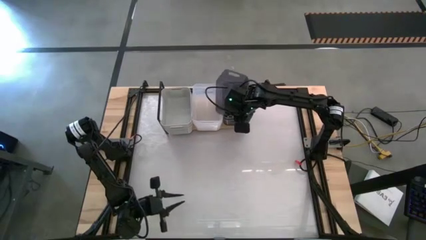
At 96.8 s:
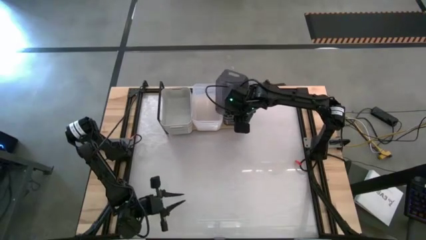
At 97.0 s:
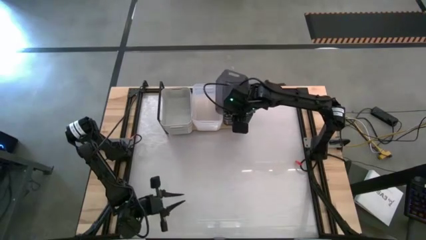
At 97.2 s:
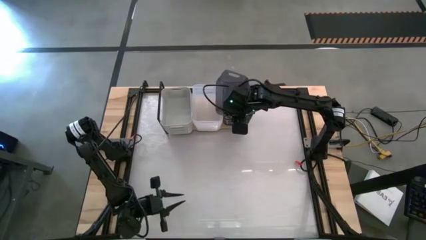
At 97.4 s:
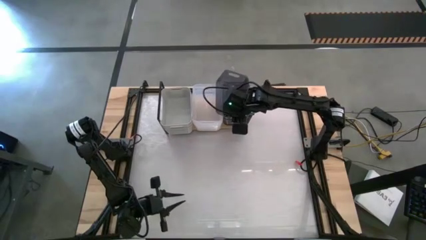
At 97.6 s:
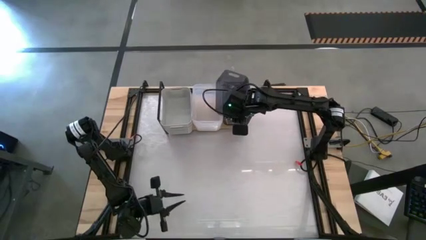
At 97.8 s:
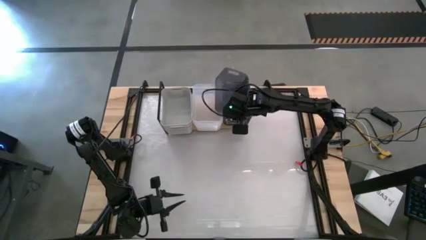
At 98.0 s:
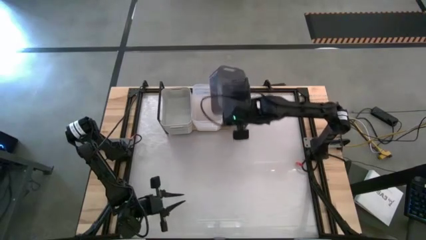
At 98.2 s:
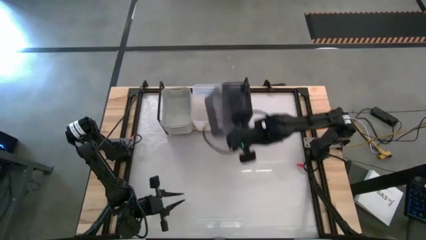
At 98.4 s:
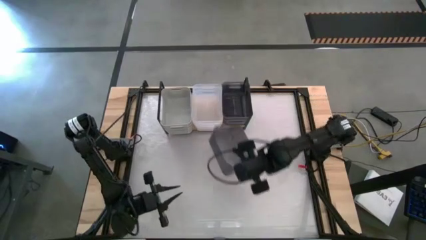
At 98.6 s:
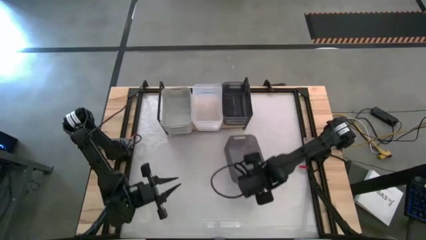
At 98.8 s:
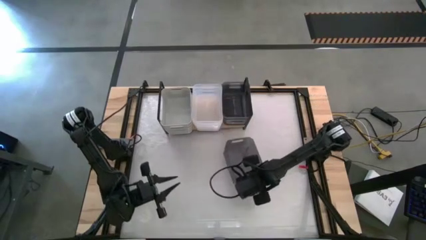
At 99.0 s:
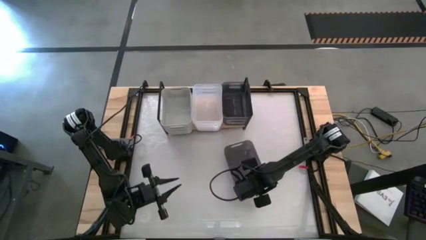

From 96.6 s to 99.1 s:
Task: Stack baskets on shelf by color
Remove the black bin from the shelf

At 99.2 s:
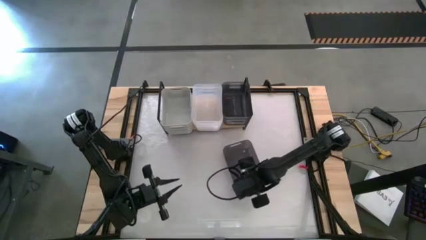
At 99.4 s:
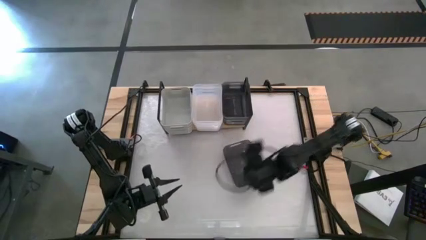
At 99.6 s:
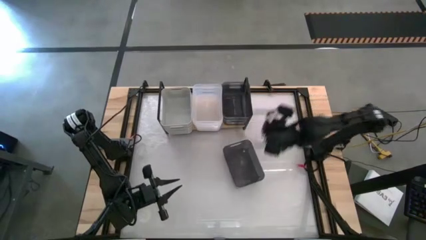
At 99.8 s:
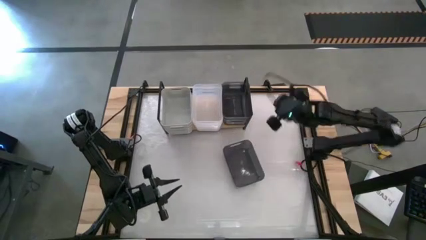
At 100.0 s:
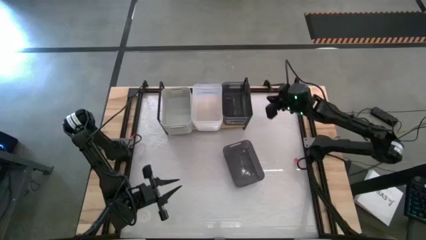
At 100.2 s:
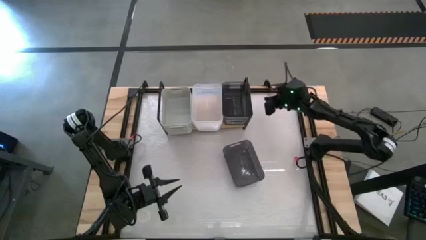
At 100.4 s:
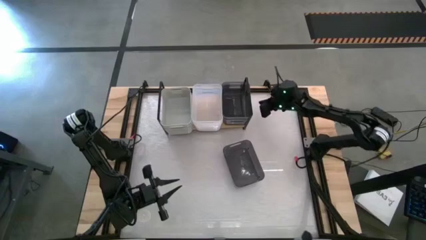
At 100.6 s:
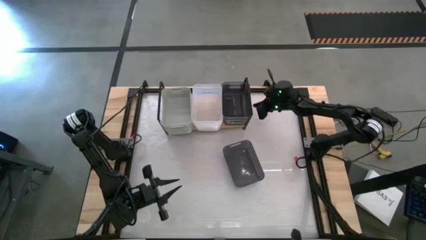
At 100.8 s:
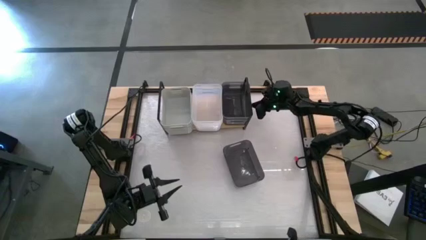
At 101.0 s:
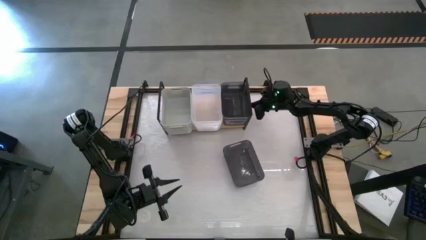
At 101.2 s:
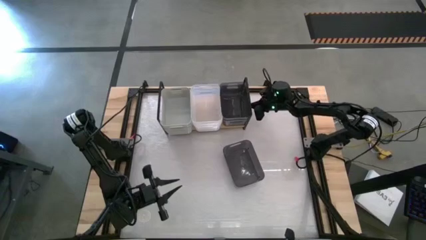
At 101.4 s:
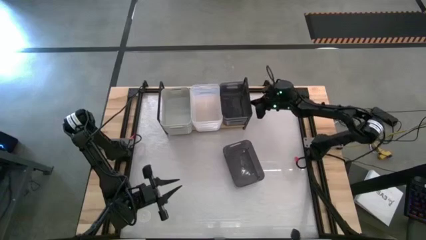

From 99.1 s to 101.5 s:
Adjust the black bins on the shelf

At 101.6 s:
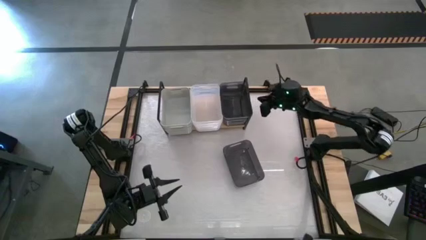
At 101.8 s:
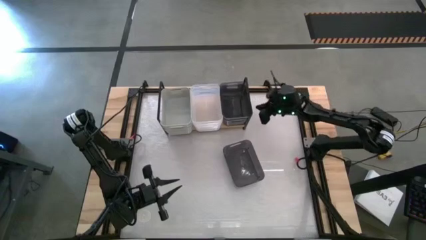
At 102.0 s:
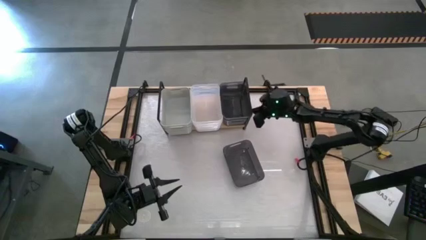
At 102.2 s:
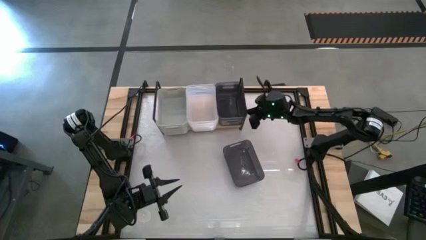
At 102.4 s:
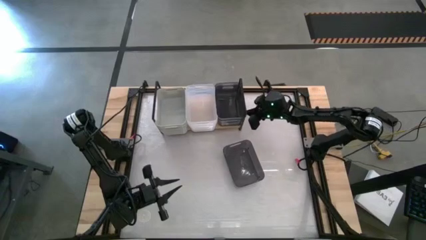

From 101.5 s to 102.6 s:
Adjust the shelf

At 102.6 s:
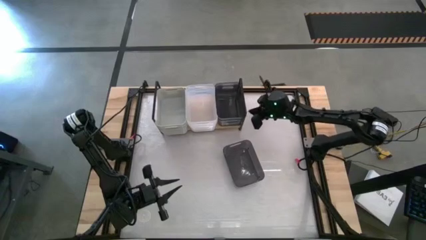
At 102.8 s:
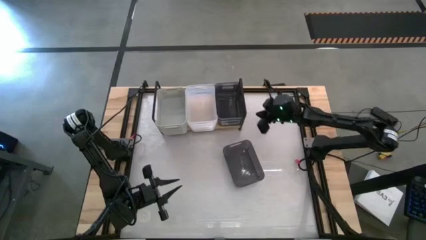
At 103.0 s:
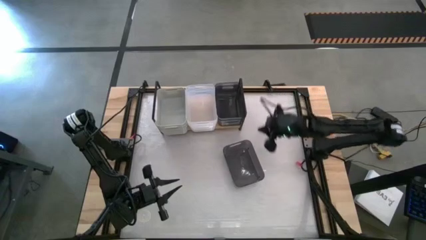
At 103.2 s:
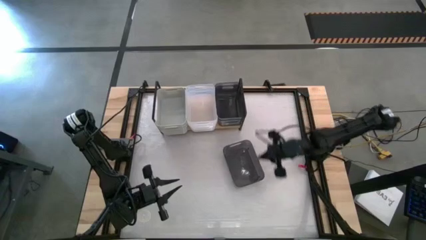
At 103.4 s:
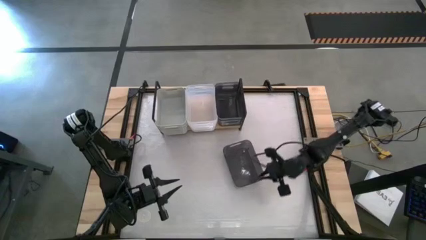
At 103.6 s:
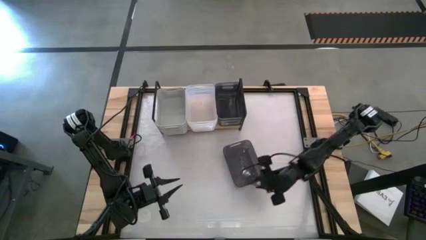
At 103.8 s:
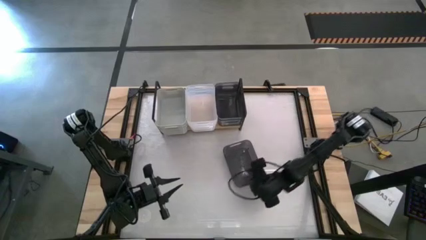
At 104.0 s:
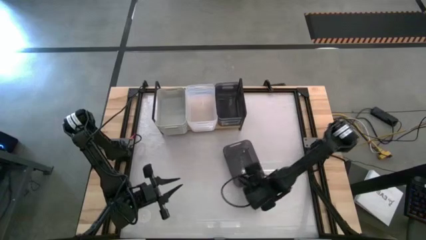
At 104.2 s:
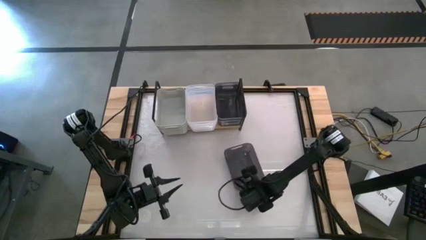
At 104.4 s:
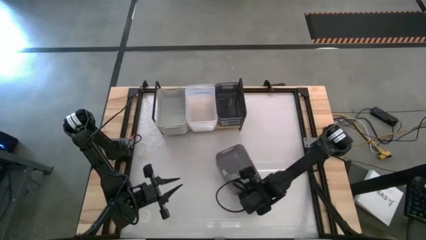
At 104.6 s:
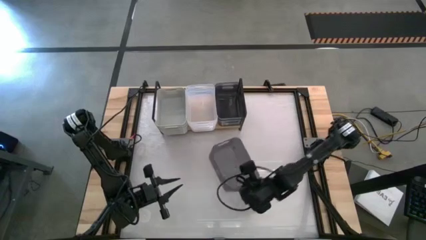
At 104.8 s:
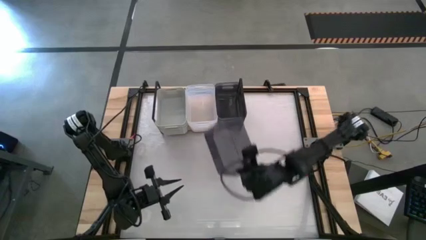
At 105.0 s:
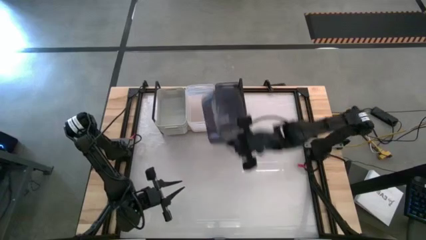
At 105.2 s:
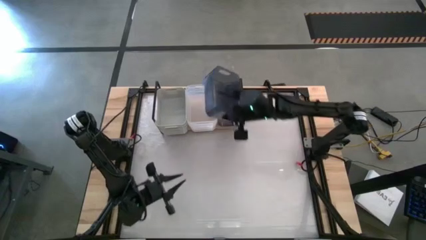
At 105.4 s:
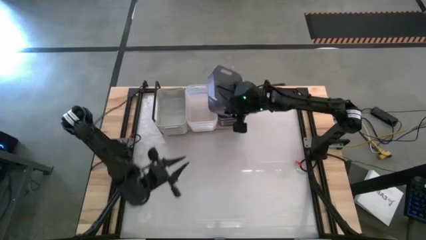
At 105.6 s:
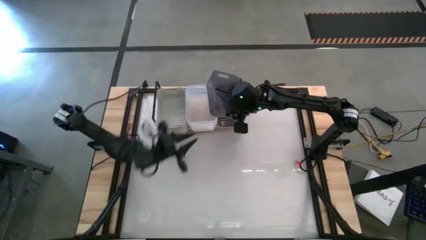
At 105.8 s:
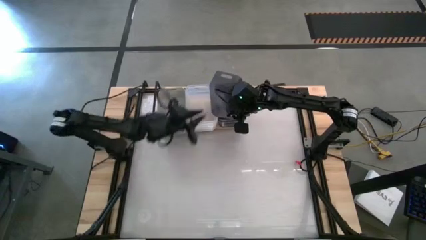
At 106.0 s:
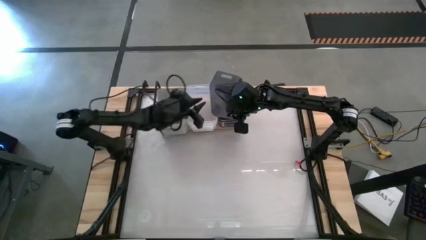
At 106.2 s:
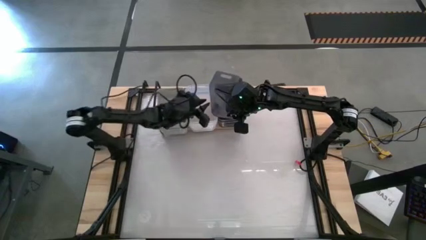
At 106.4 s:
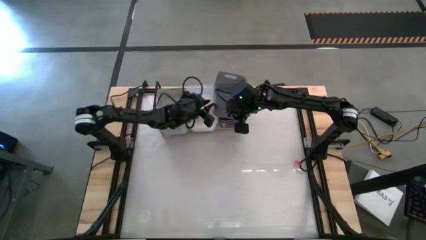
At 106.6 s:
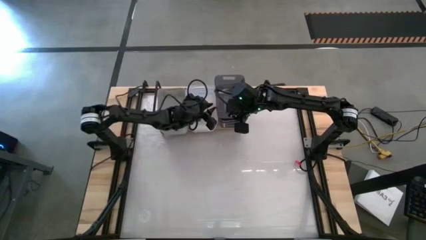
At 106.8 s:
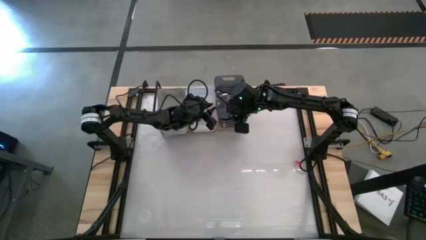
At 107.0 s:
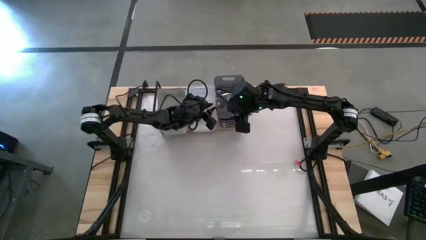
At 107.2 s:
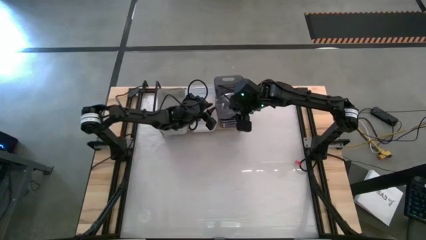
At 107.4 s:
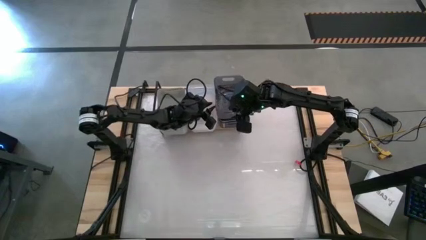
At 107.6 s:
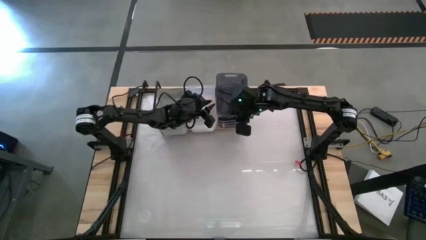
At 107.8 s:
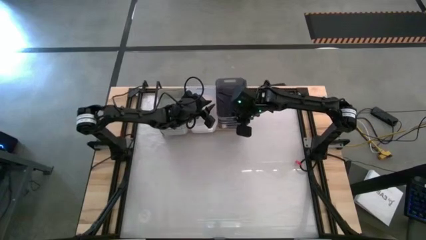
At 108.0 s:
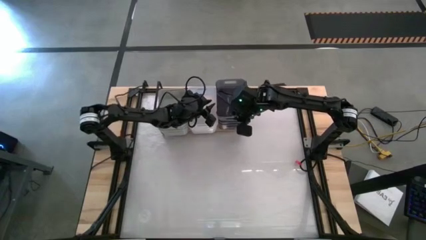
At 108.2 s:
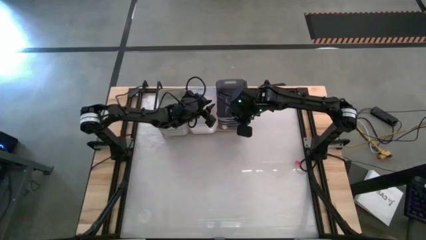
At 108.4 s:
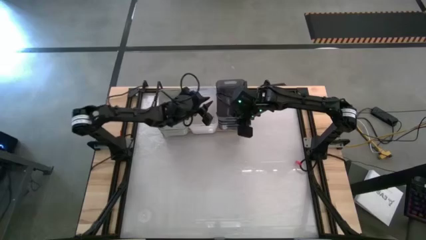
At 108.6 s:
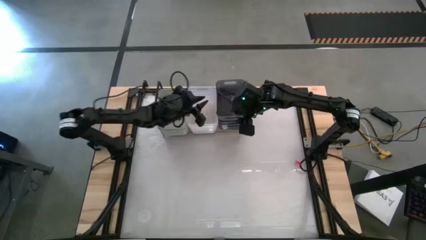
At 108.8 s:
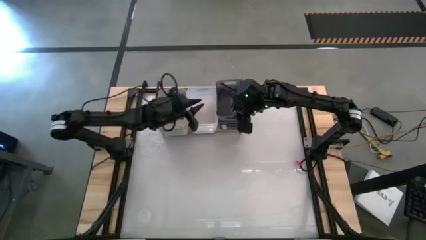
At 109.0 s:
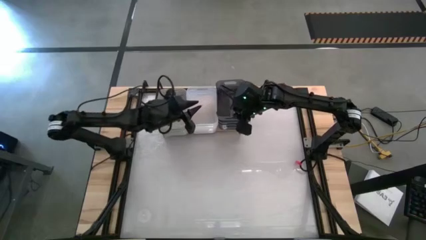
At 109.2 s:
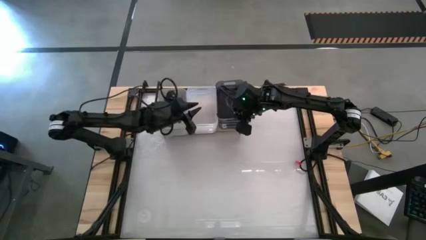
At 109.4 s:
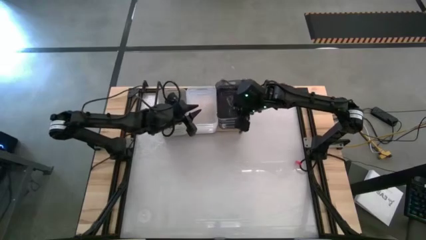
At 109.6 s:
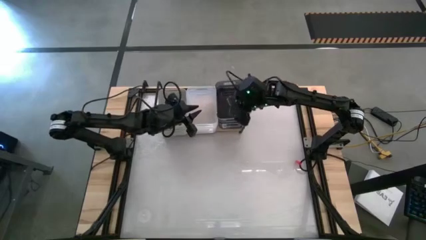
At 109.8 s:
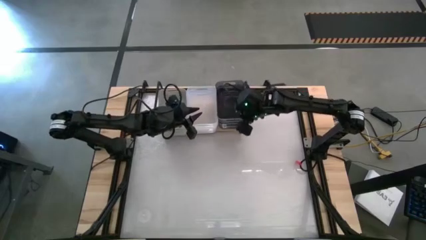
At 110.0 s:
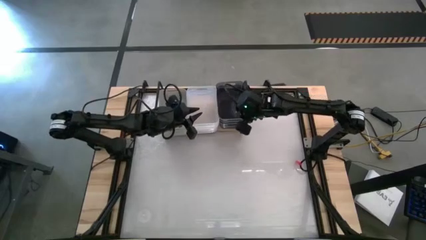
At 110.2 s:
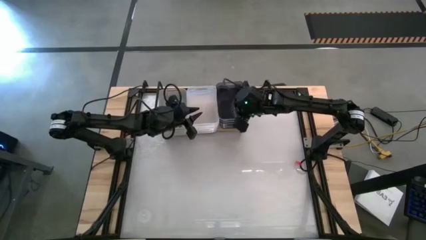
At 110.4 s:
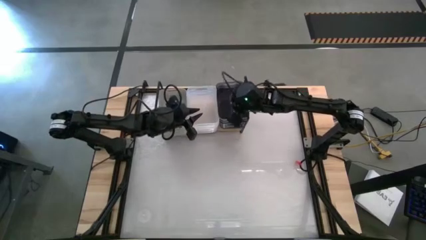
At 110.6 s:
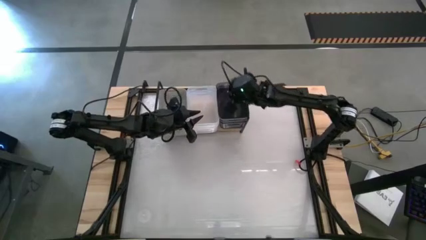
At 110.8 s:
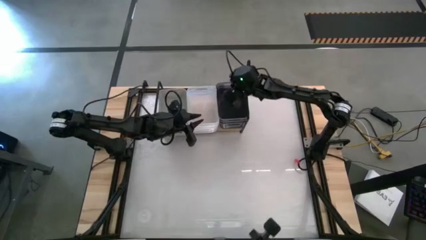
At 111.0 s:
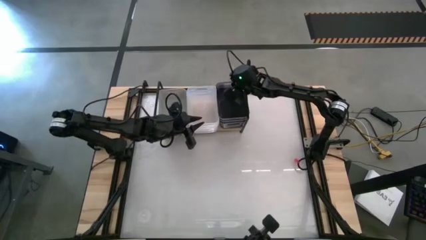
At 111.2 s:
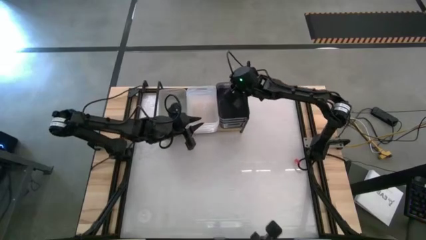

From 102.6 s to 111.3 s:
Stack the black bin on top of the other black bin on the shelf

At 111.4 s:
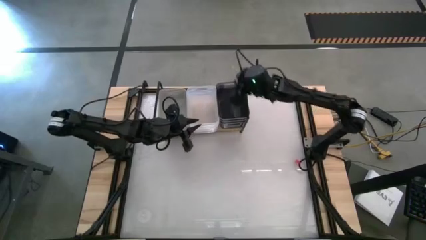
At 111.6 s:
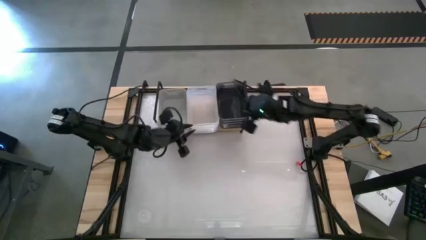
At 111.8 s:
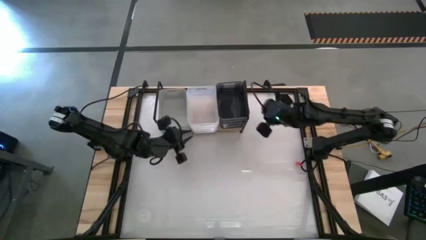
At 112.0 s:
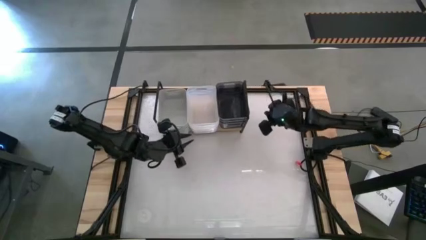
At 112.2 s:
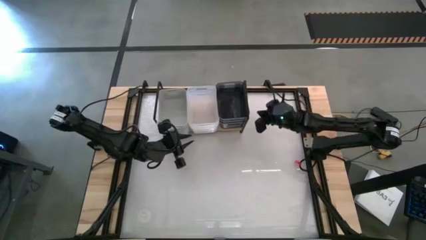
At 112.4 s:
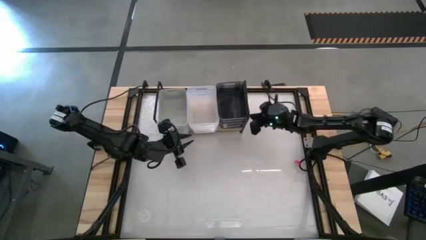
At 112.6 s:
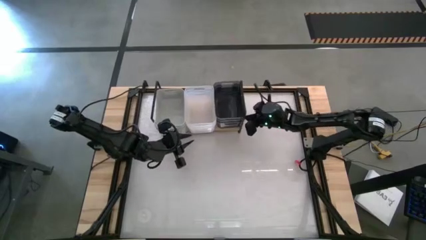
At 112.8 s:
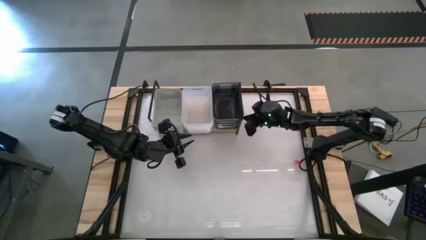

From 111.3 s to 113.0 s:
Adjust the shelf
